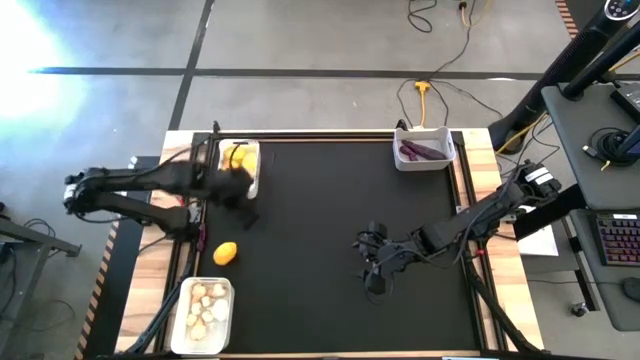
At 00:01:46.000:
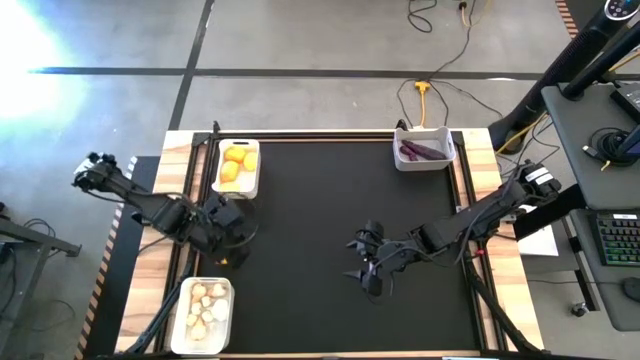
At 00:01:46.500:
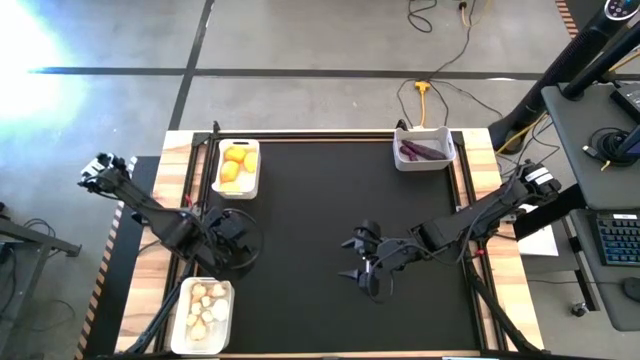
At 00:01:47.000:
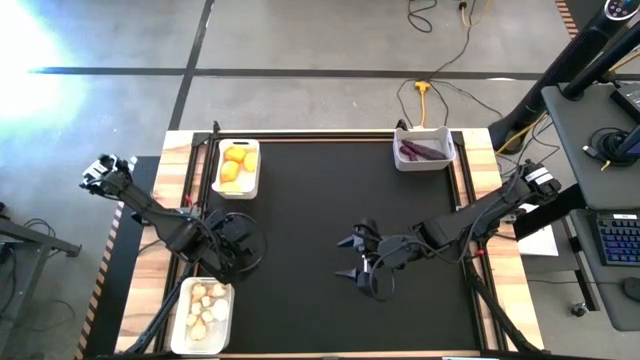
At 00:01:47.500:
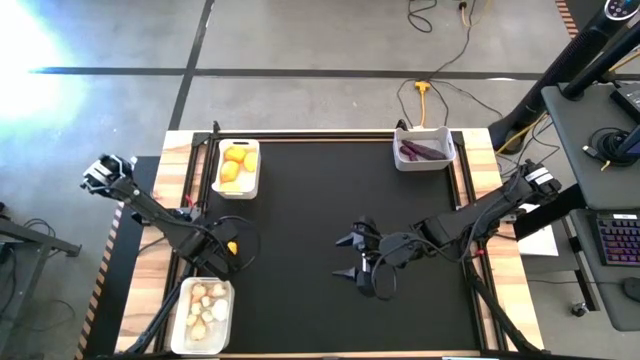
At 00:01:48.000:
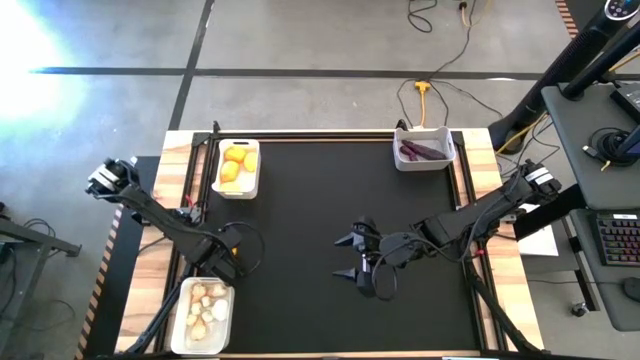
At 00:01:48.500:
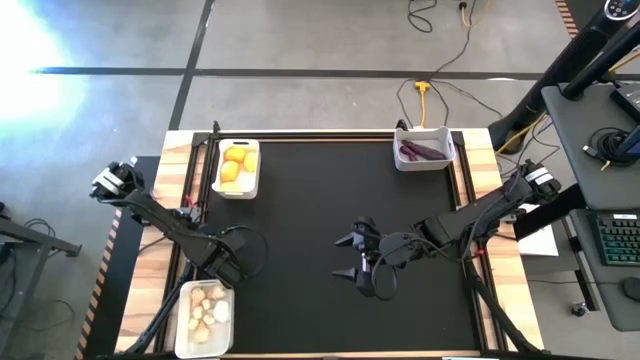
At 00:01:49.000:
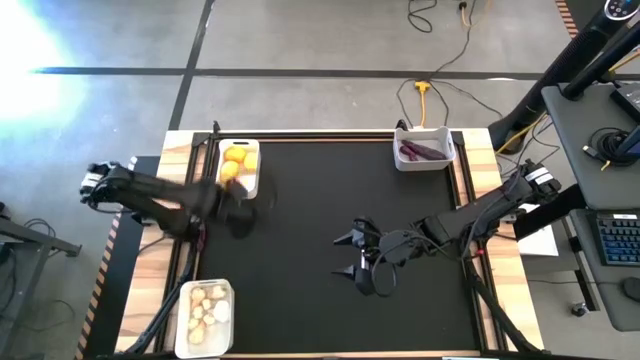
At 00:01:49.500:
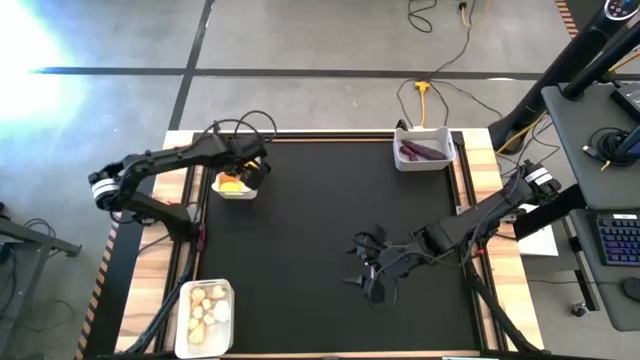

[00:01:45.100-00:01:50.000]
Task: Sort produce into baskets
Put the lemon into the top white bin

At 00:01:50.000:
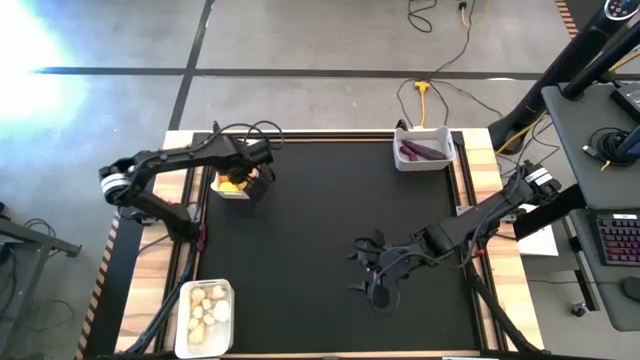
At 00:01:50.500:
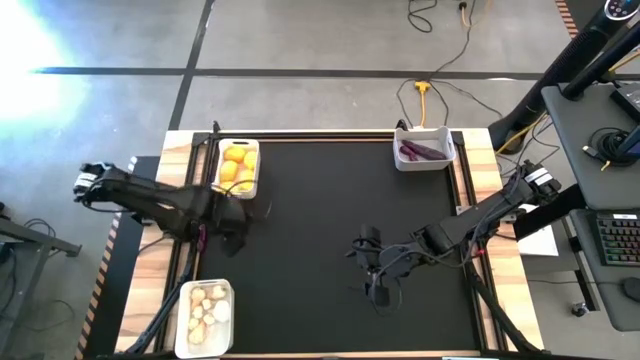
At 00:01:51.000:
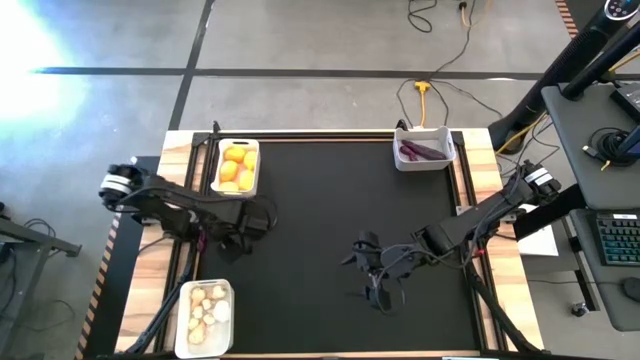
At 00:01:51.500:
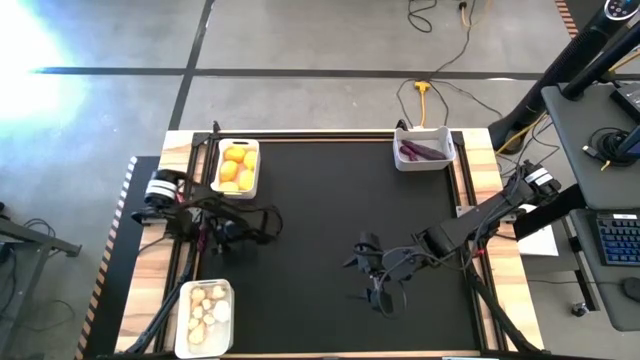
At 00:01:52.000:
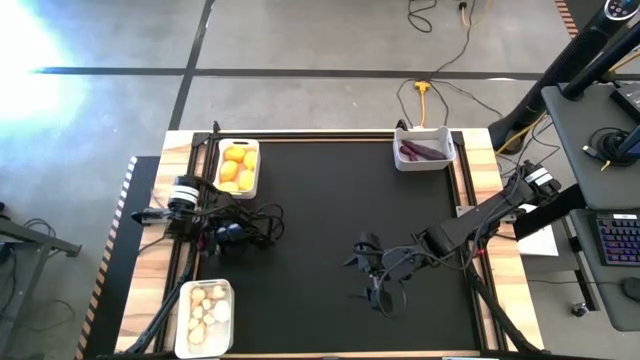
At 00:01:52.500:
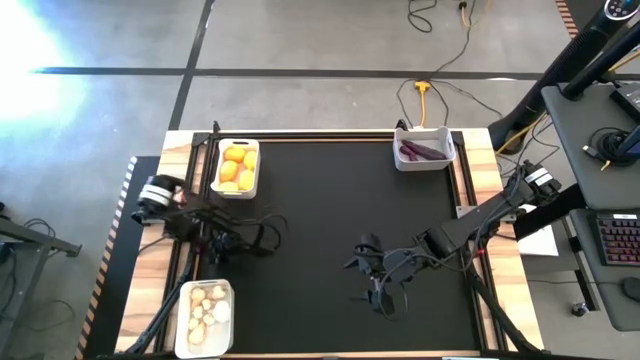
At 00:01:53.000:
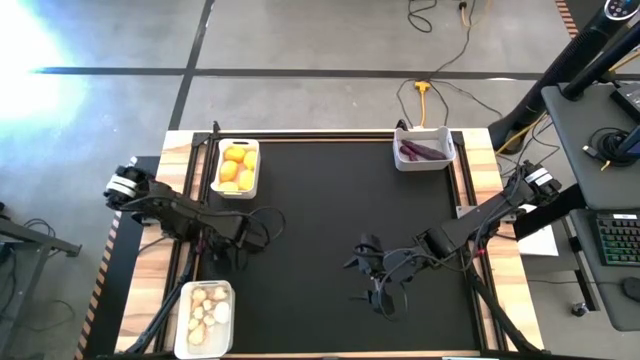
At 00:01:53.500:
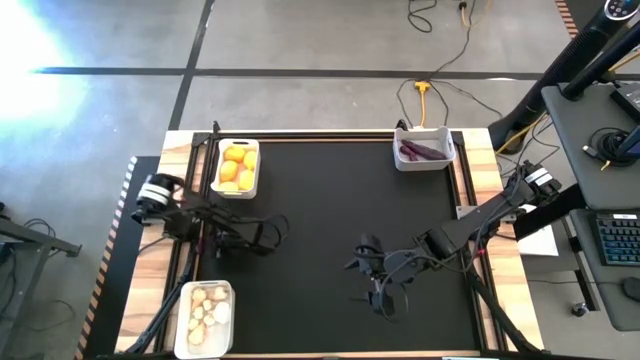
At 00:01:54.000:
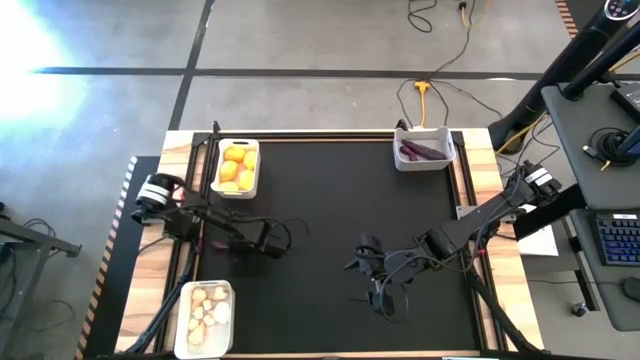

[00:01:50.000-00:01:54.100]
Move the small eggplant to the center of the table

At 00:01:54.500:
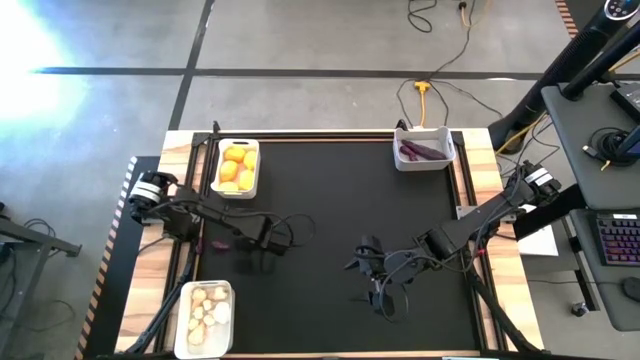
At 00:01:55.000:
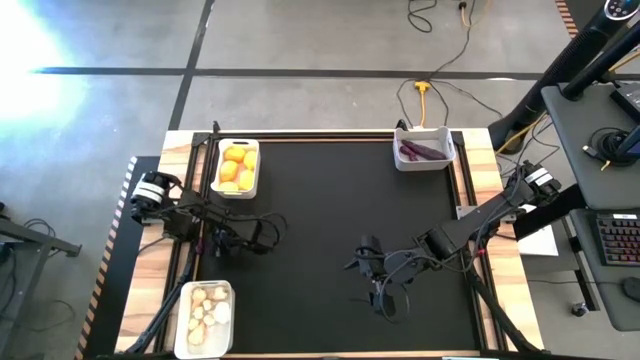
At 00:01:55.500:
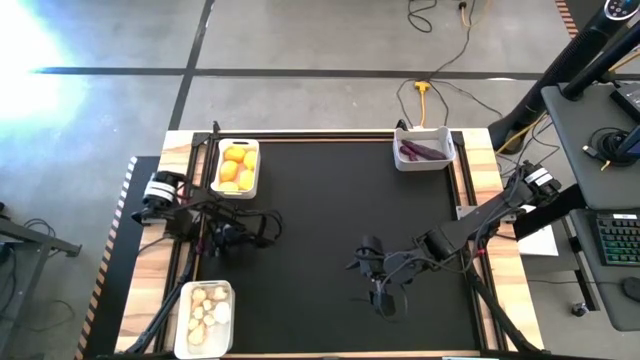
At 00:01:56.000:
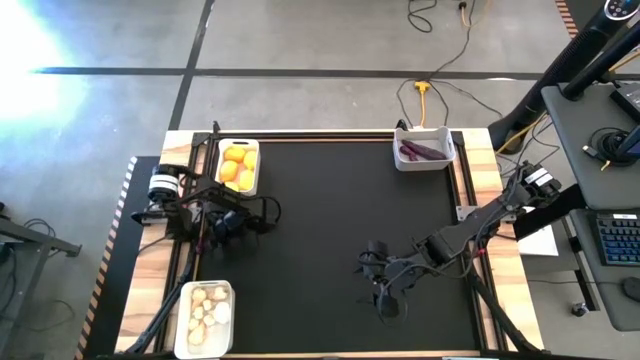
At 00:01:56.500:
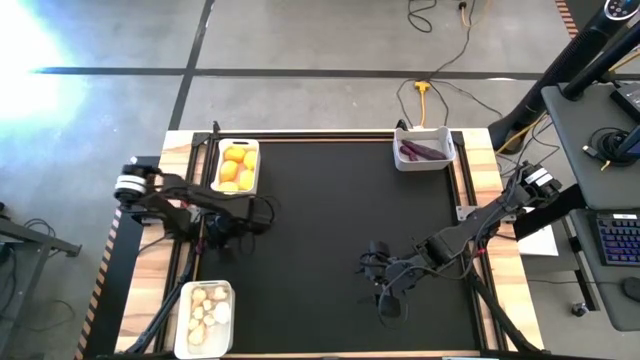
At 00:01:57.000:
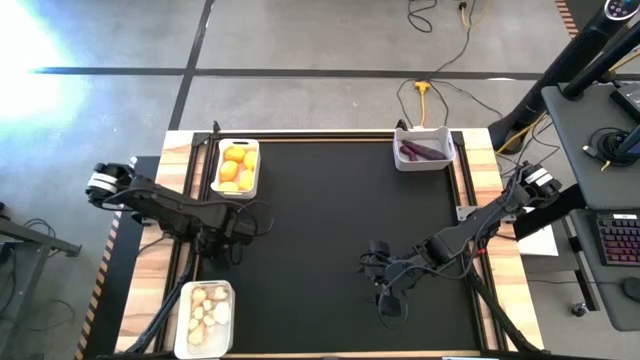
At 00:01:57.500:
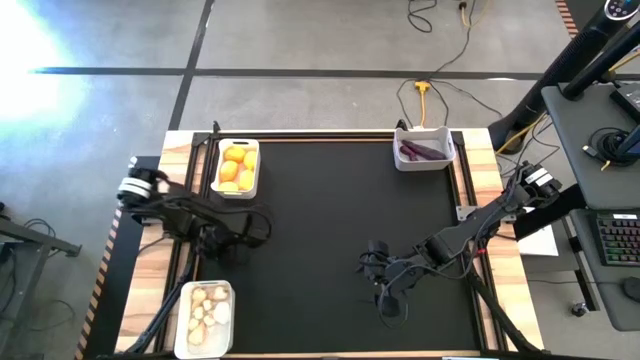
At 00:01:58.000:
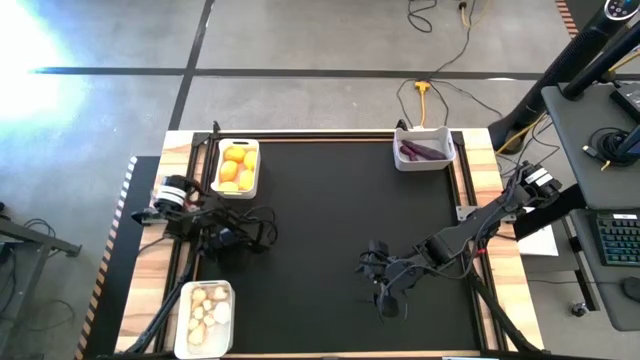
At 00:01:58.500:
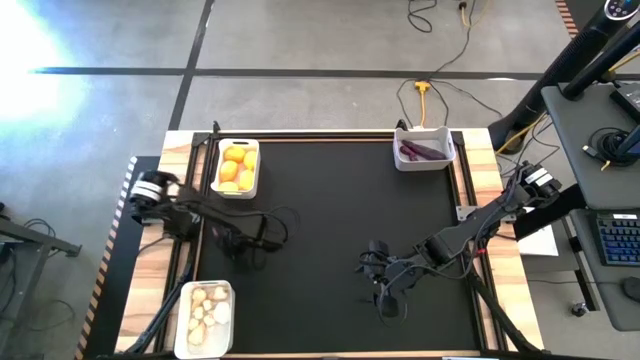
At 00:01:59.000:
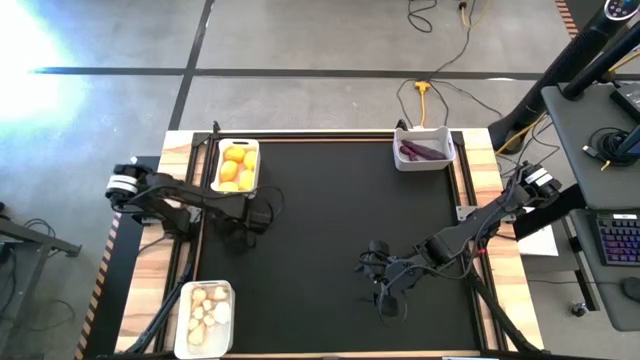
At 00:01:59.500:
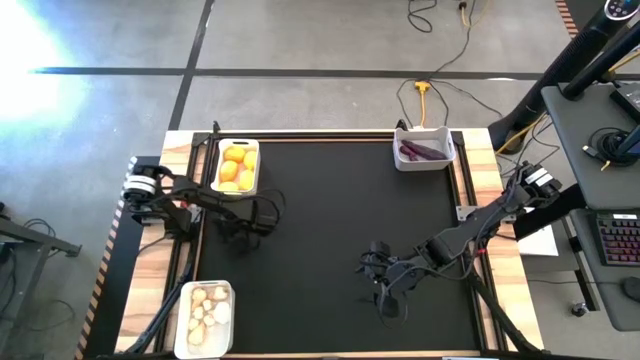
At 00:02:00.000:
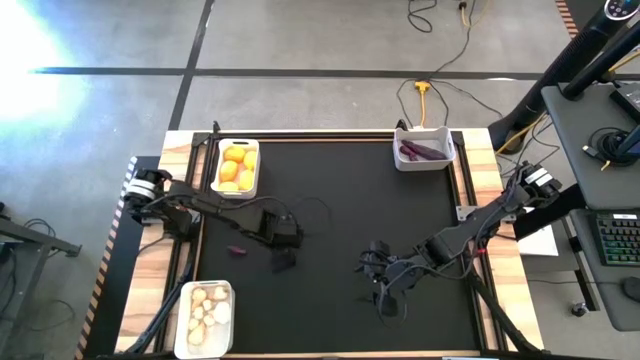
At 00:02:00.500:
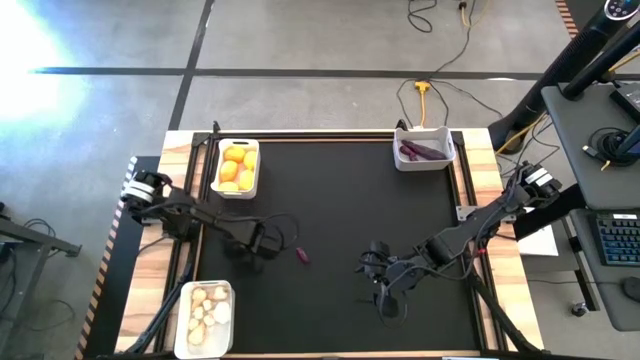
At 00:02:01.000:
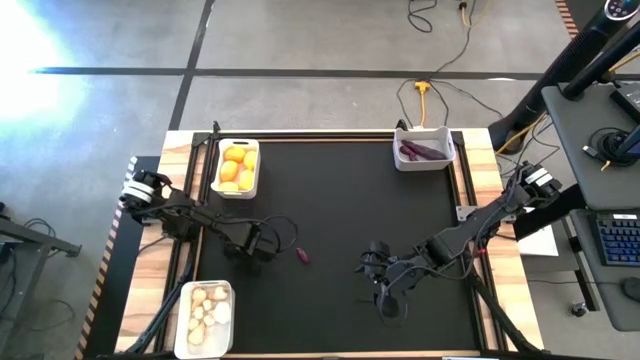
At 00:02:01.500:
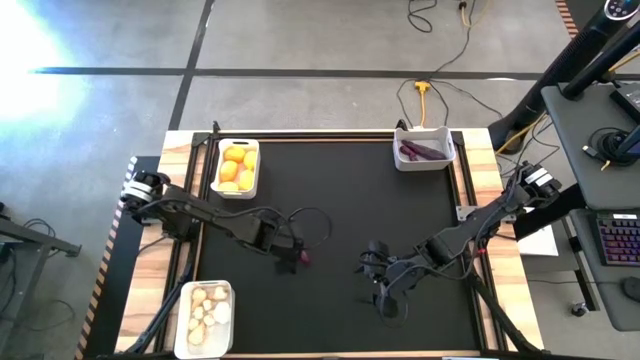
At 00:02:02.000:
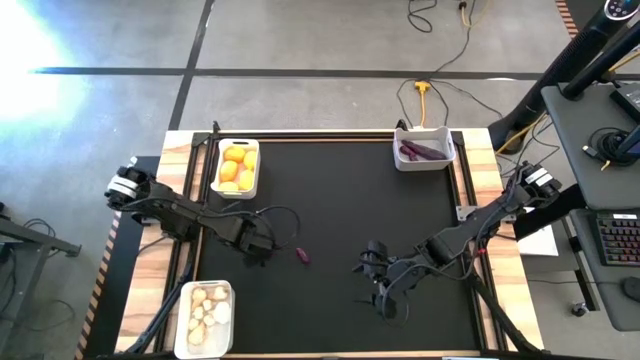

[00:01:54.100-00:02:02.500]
Move the small eggplants to the center of the table

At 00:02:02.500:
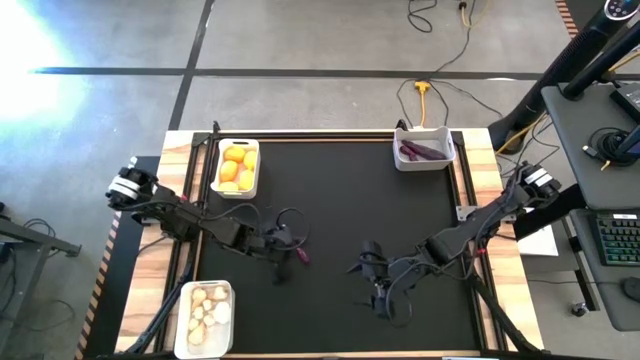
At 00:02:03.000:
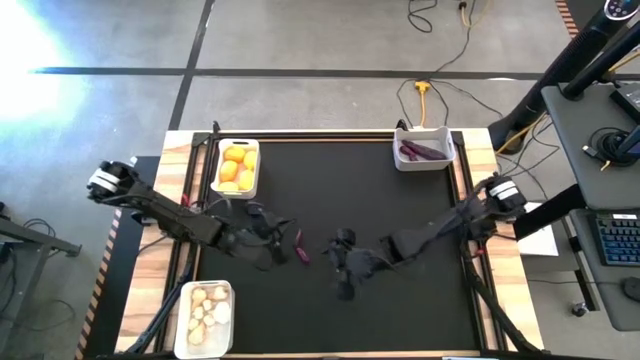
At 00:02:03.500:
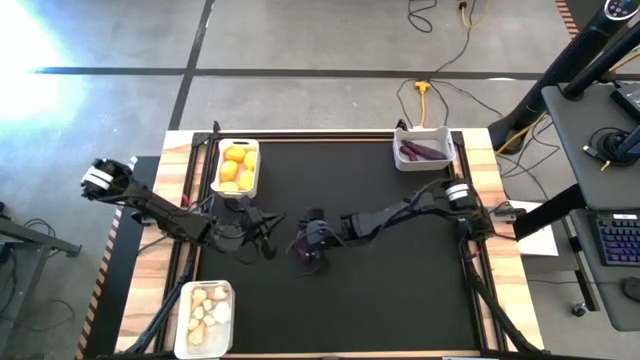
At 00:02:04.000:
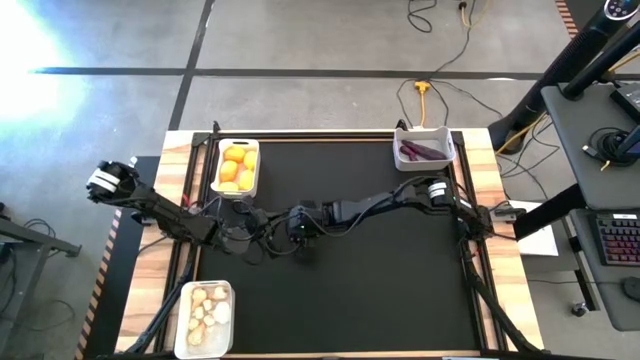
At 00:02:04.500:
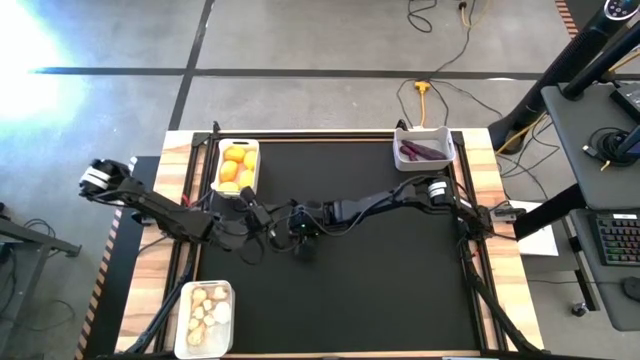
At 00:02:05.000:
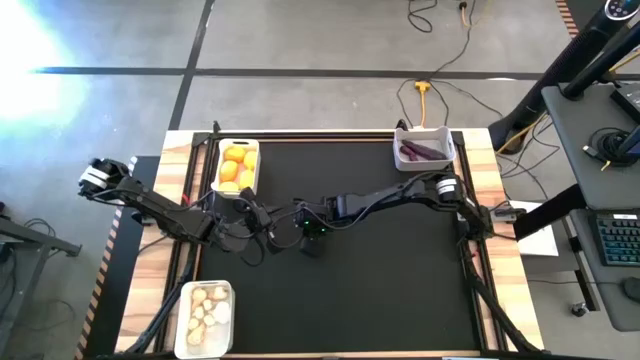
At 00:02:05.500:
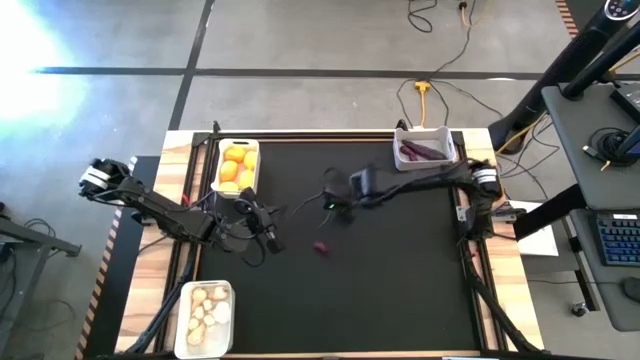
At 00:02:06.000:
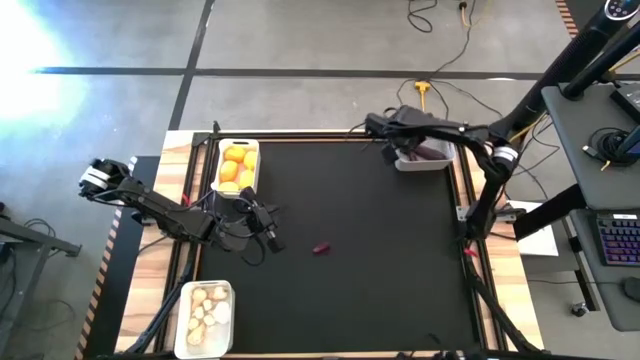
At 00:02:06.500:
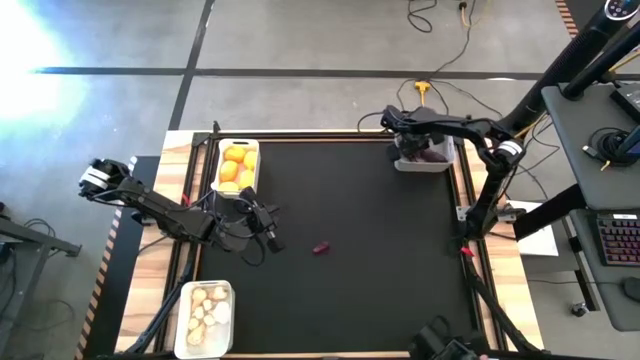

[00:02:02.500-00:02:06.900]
Put the small eggplant into the gray bin
